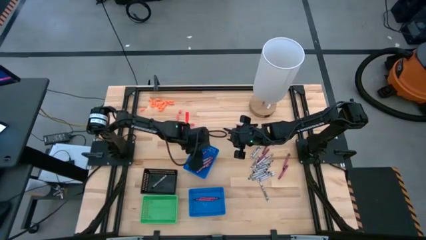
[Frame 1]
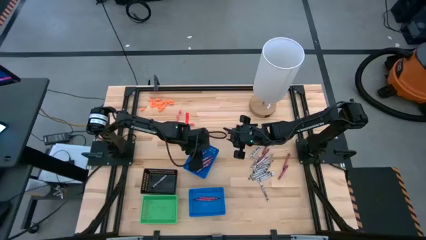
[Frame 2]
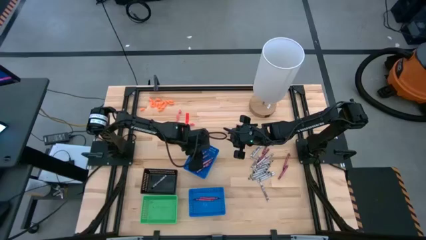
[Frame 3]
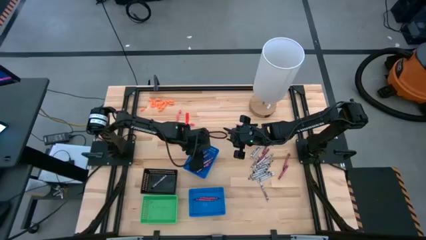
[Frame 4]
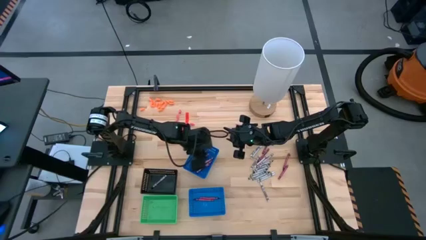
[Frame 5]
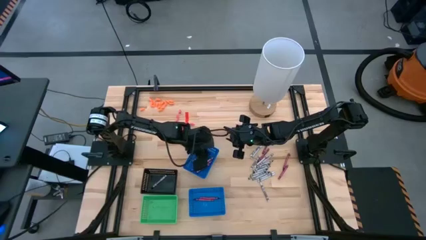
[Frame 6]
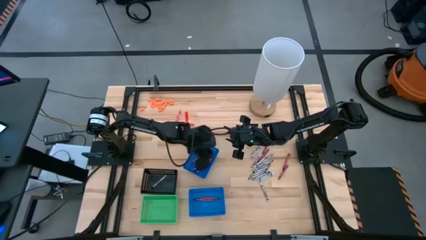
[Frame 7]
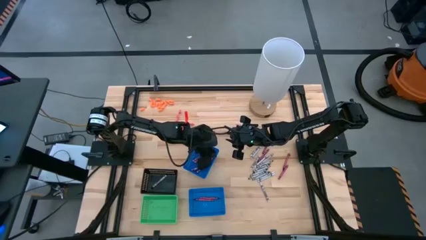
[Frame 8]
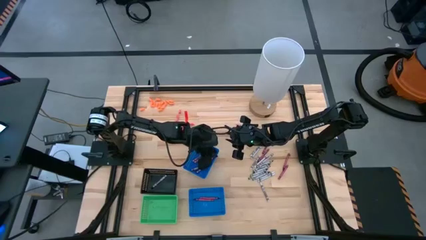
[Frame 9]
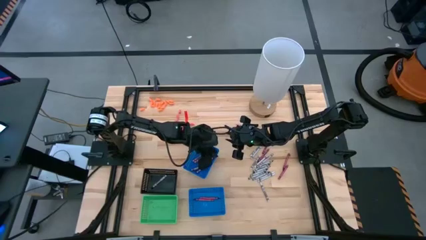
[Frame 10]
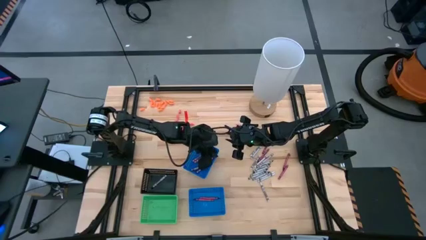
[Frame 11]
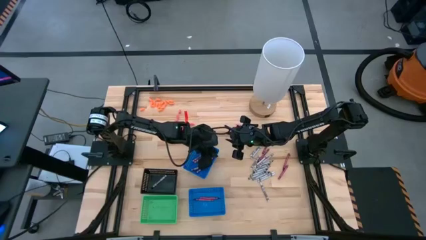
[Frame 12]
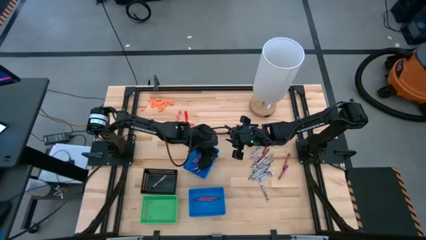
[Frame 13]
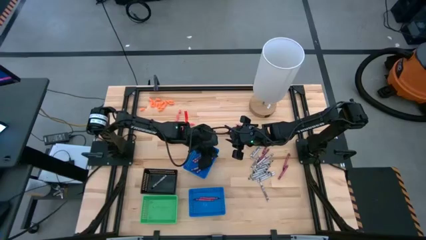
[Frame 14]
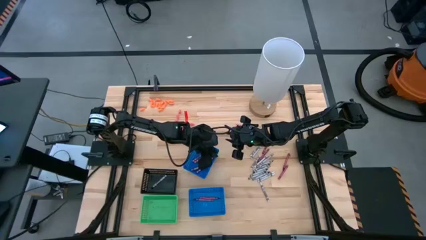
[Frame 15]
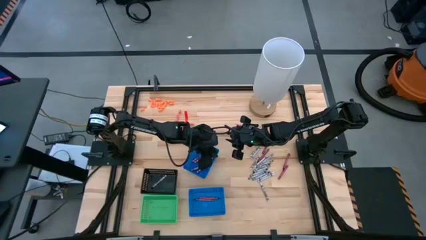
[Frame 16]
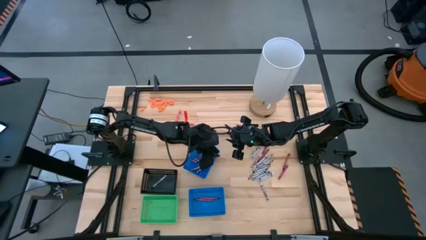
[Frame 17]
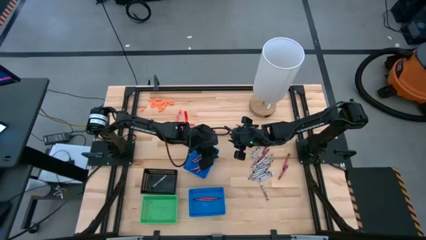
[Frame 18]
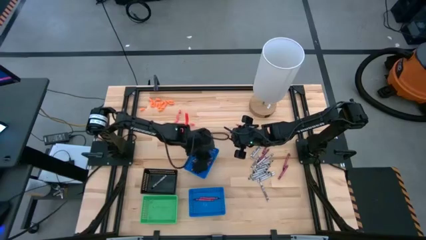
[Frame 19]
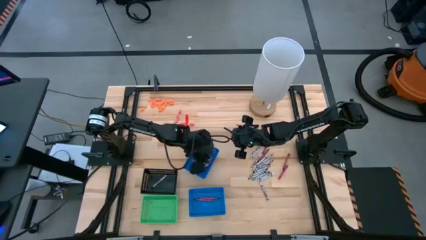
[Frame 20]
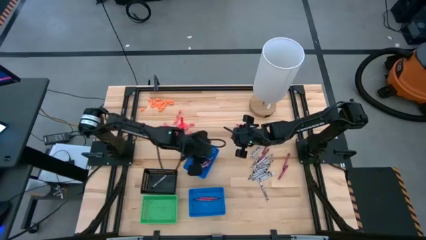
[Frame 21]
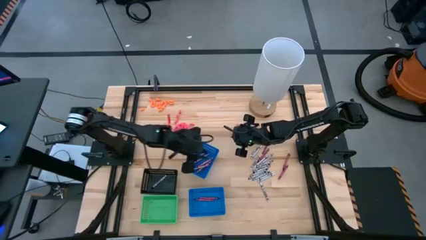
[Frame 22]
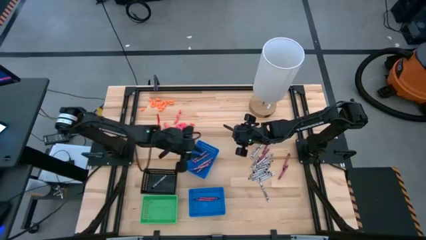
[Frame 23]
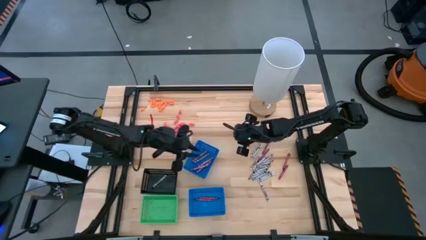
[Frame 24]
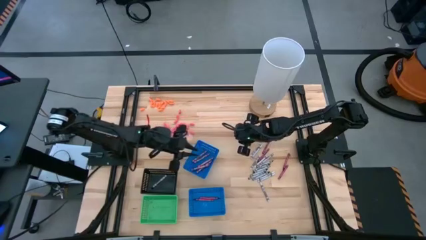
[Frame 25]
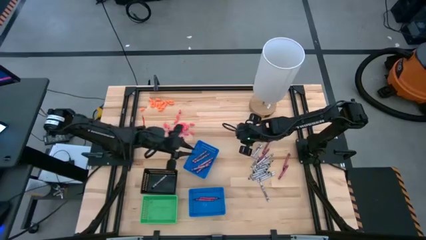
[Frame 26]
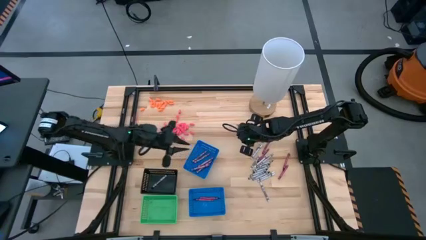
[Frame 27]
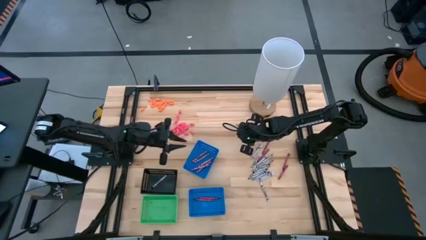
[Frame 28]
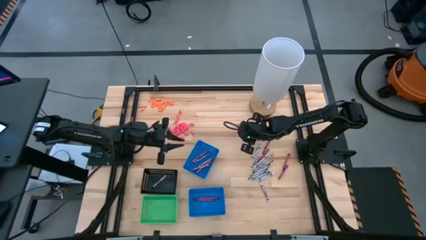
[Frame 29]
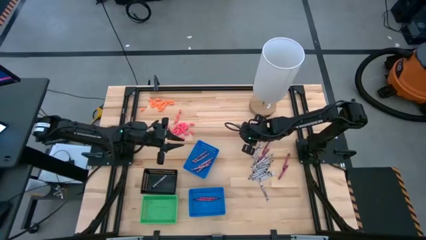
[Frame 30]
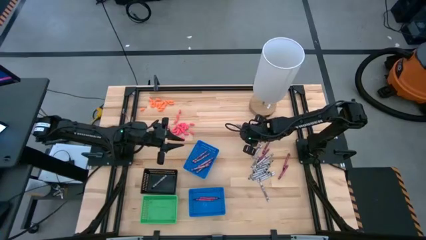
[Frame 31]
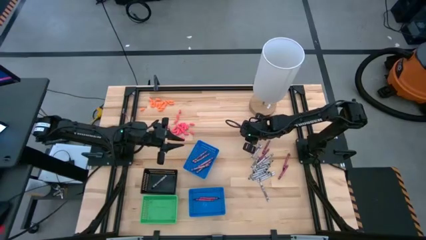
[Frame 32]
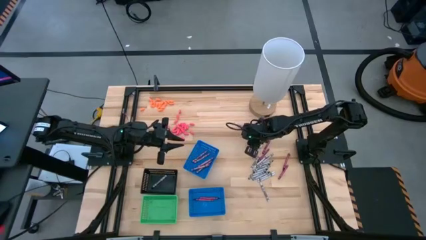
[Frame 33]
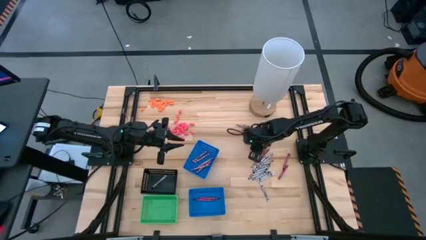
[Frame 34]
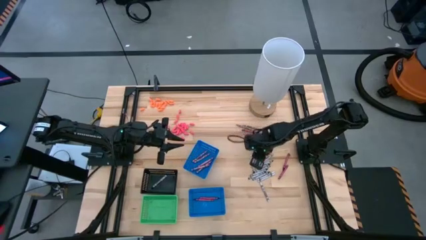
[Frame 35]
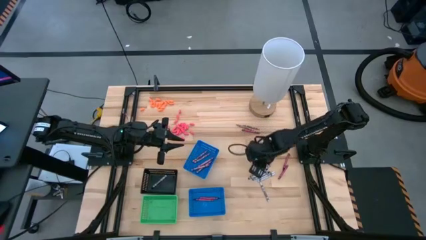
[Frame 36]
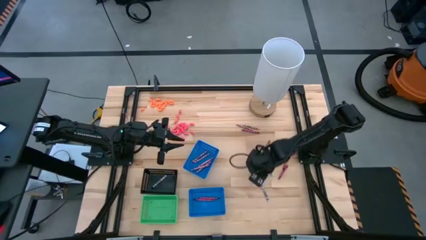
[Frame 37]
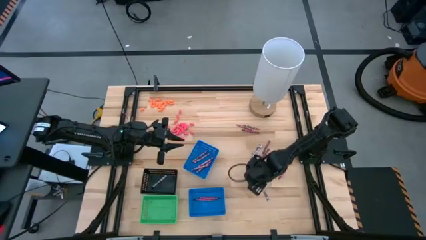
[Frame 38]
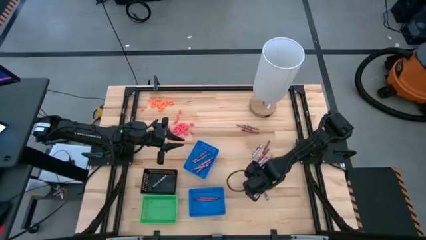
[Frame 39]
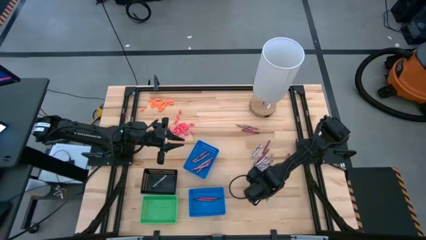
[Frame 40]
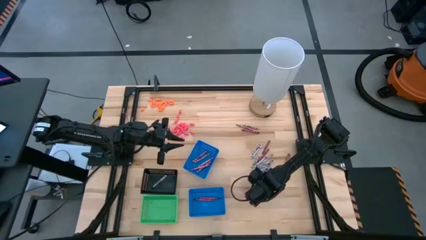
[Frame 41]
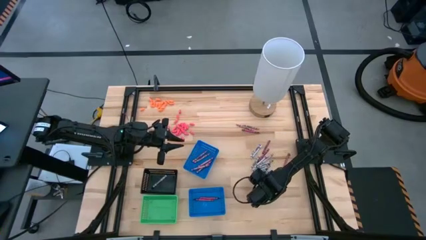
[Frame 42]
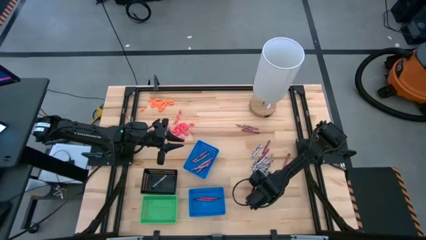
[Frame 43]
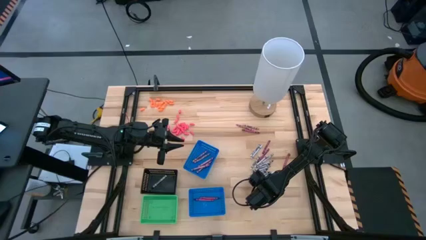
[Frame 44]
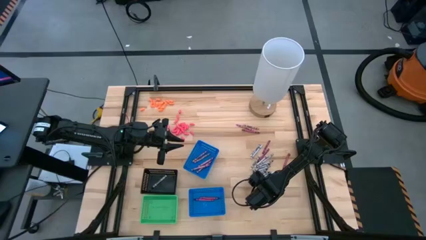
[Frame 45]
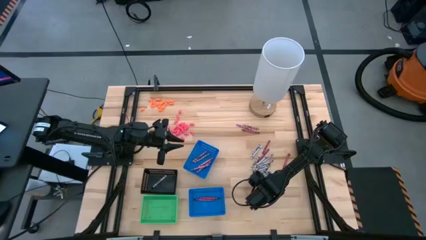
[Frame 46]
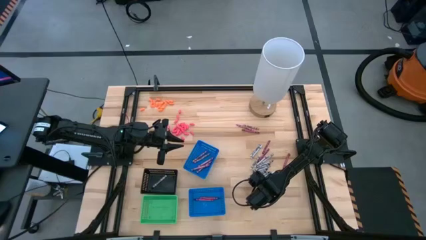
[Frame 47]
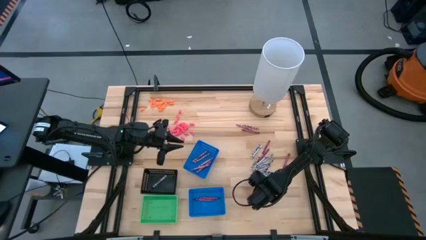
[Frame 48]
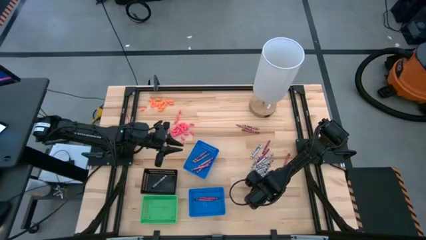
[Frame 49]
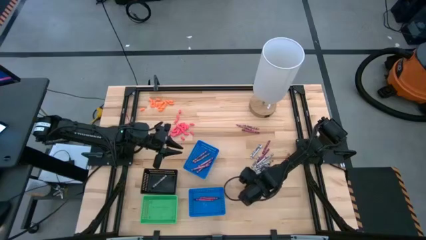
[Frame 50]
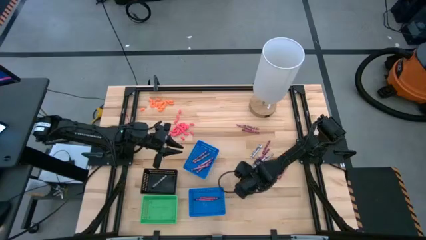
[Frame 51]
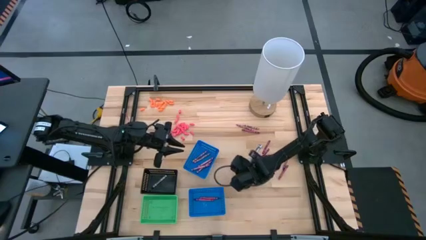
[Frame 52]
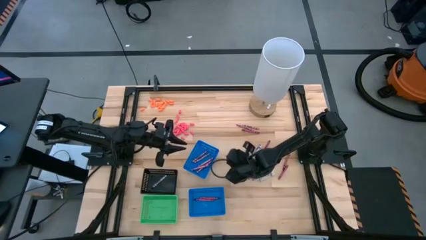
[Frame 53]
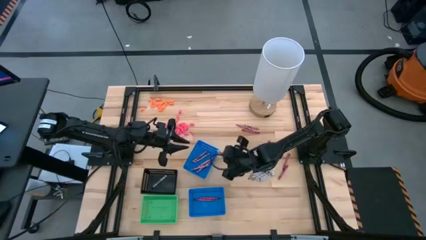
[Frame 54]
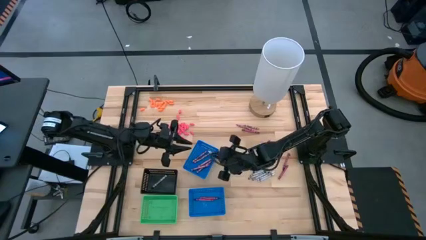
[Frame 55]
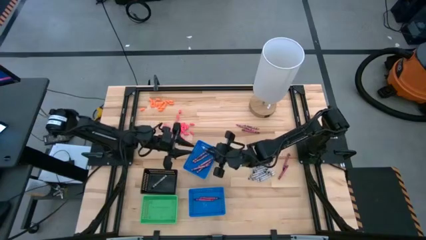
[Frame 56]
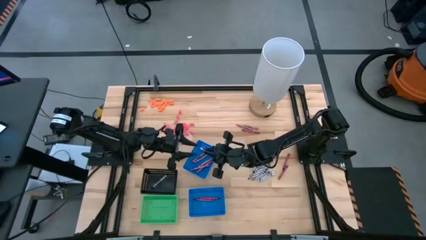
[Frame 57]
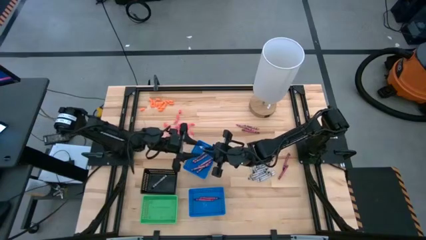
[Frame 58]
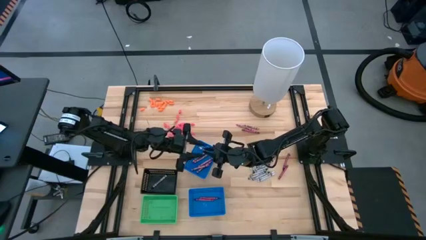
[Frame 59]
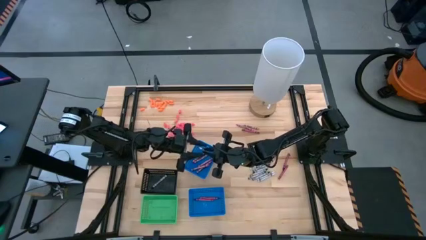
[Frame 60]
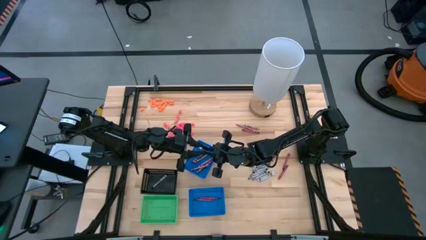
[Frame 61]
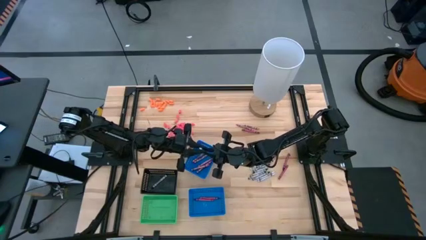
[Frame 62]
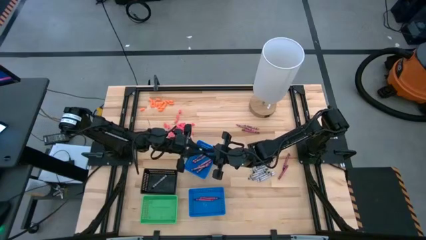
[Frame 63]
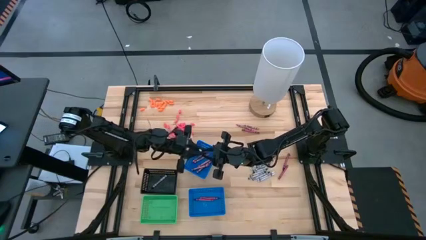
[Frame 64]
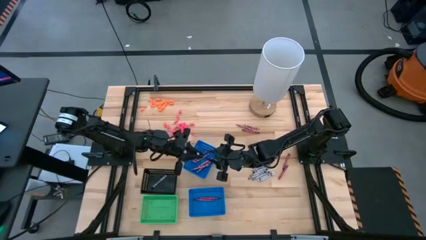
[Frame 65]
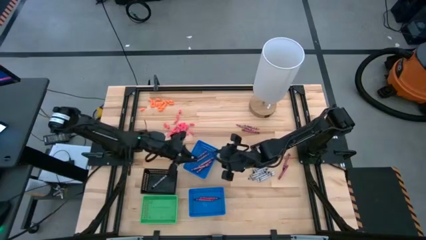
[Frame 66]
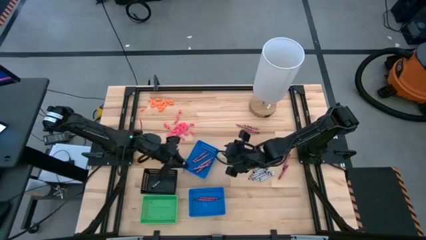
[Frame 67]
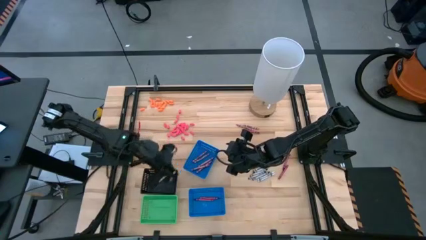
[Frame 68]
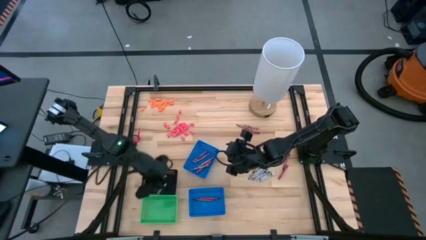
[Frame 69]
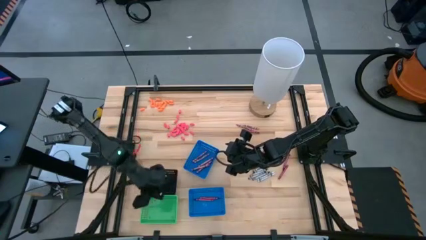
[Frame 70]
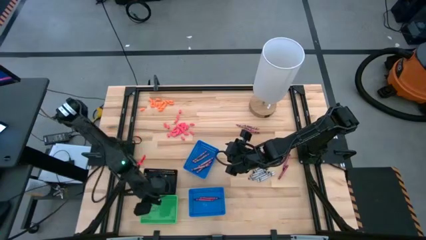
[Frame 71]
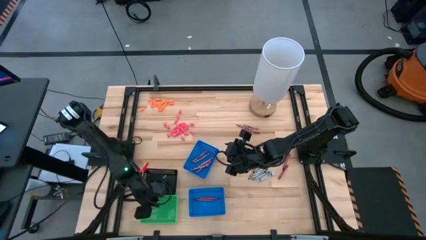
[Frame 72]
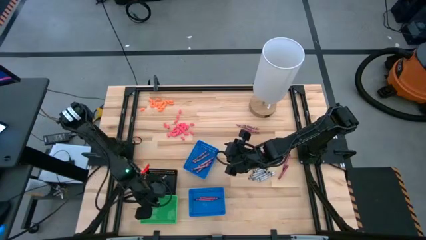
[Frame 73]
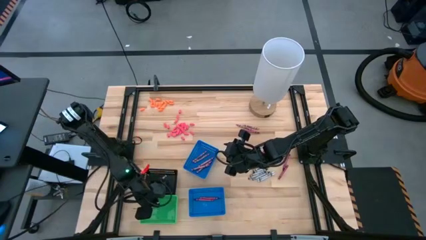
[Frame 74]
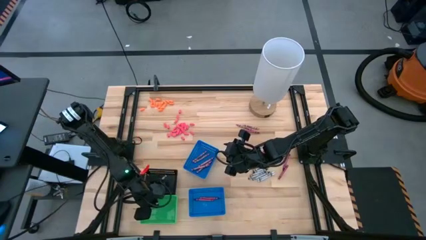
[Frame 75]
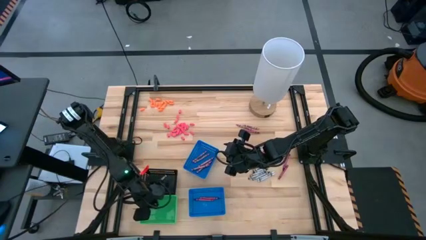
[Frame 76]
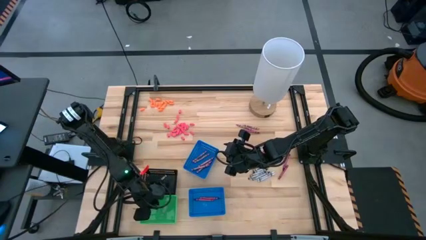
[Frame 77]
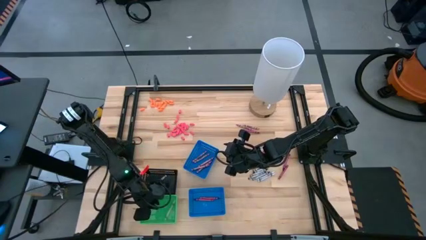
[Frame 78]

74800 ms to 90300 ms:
Task: Sort crayons
Put the white crayon into the green bin
